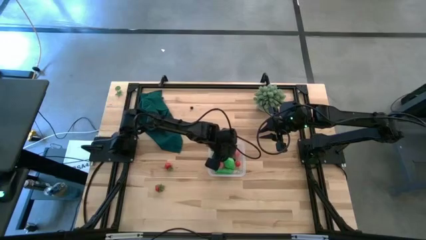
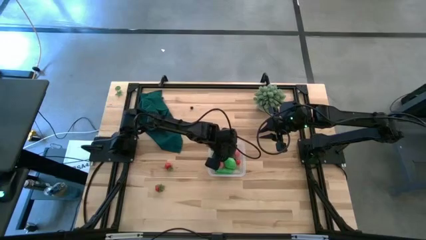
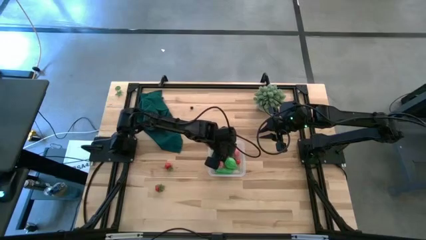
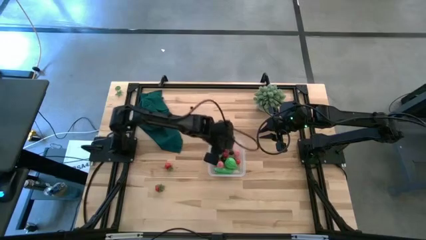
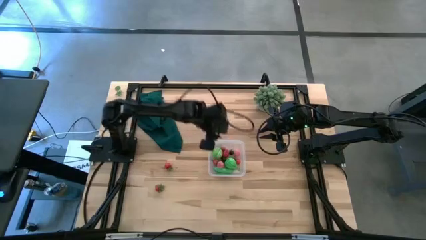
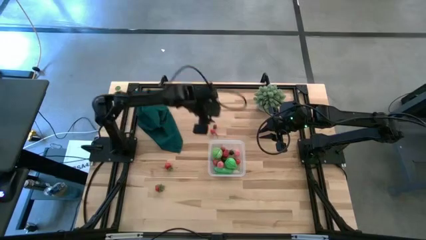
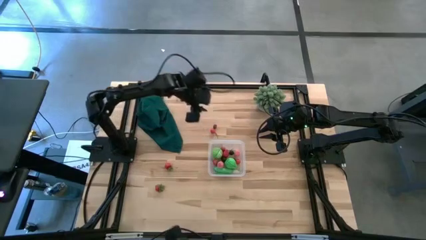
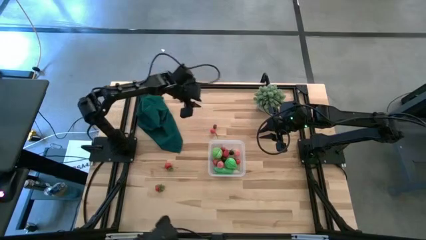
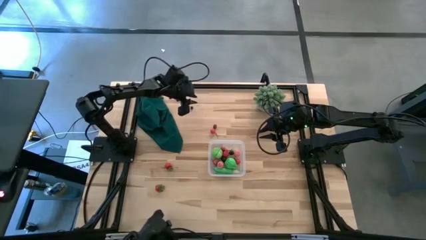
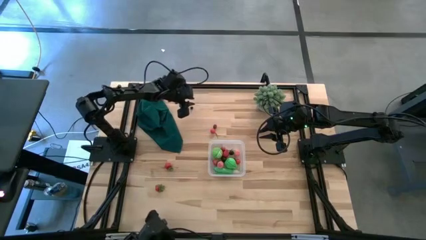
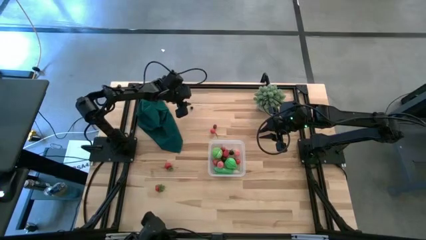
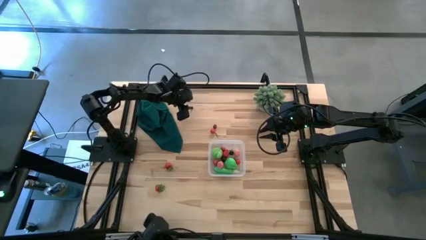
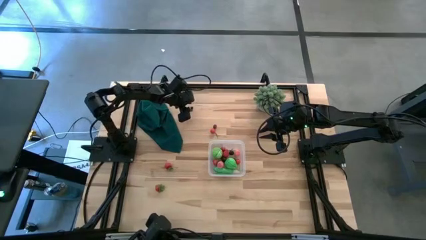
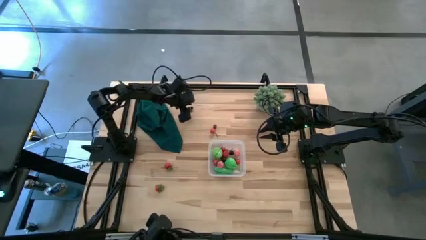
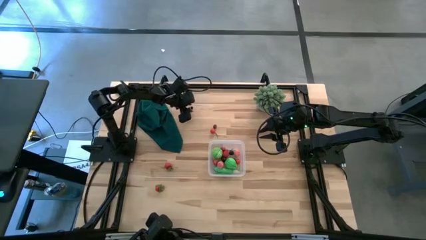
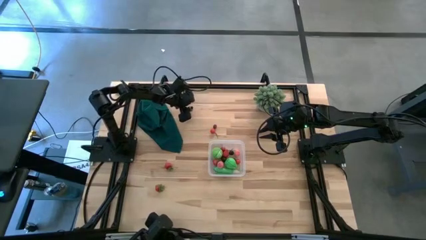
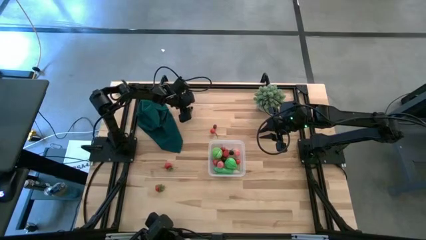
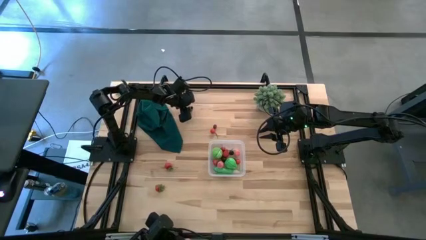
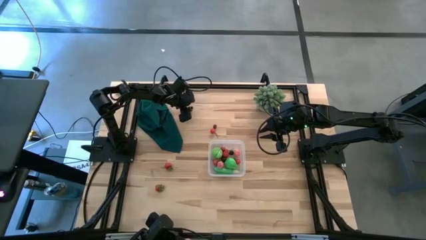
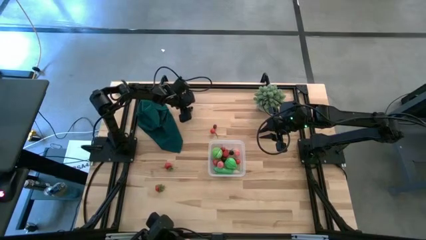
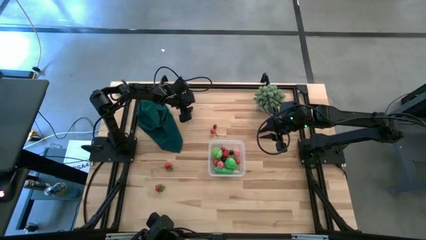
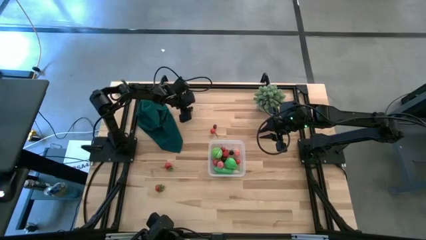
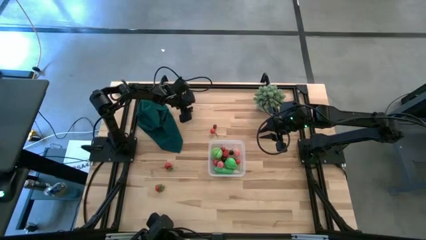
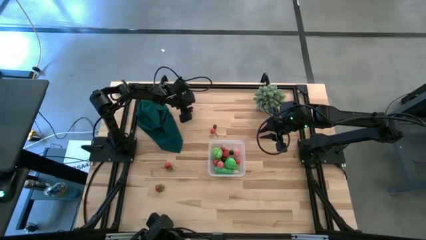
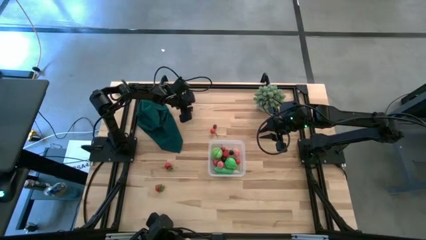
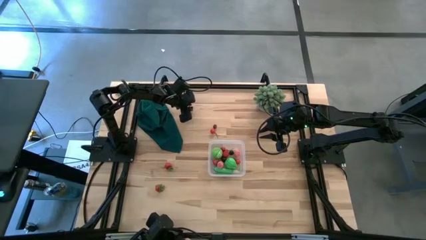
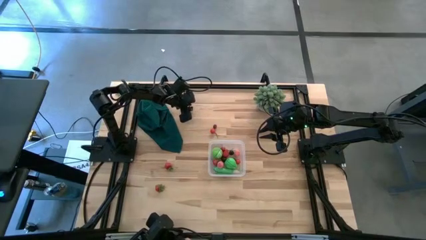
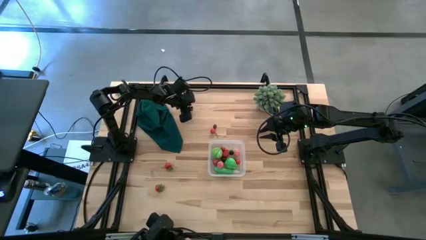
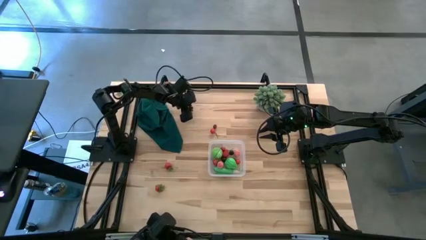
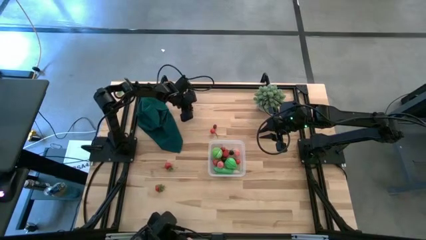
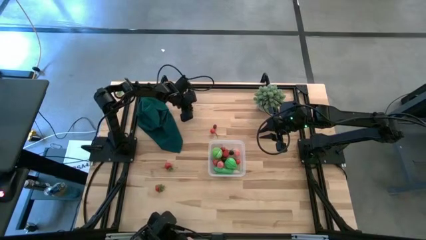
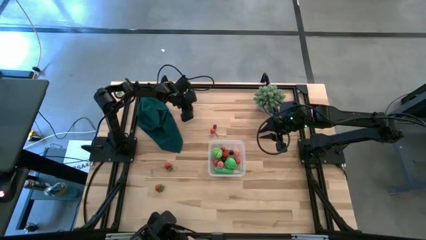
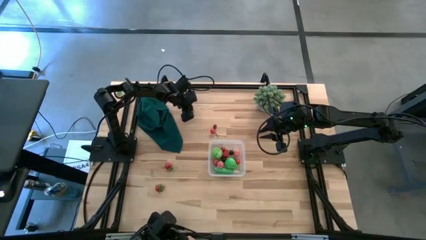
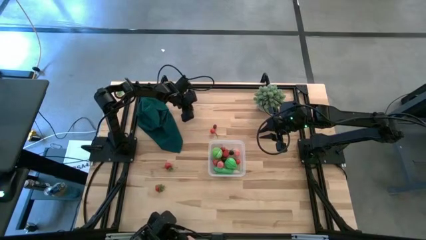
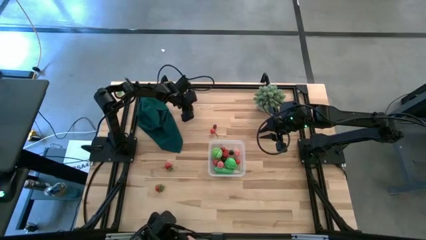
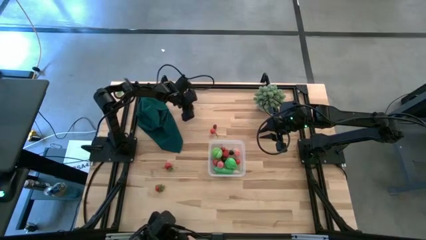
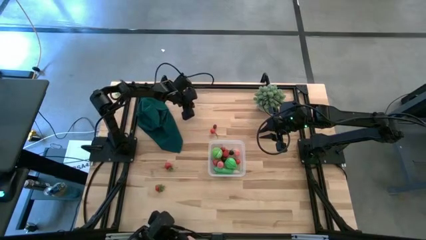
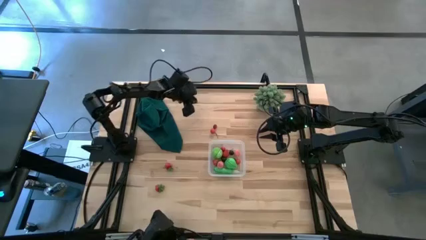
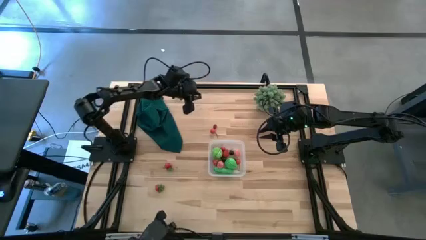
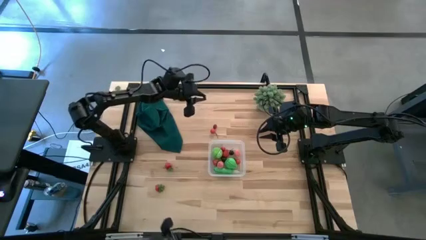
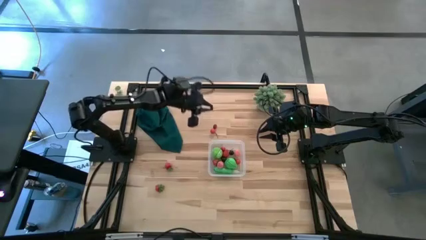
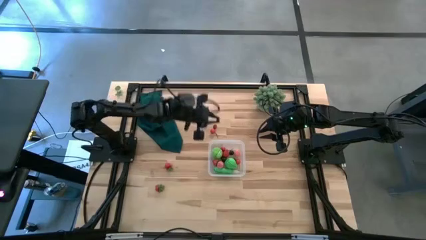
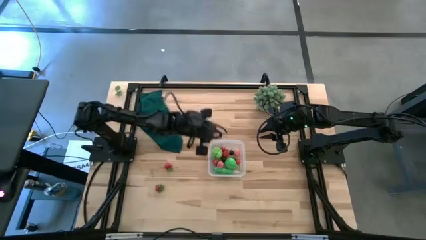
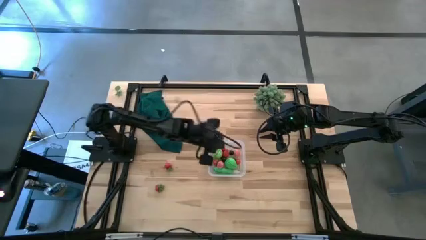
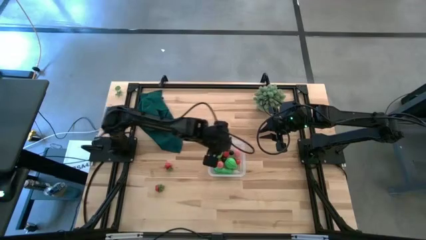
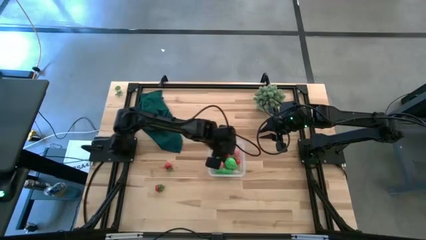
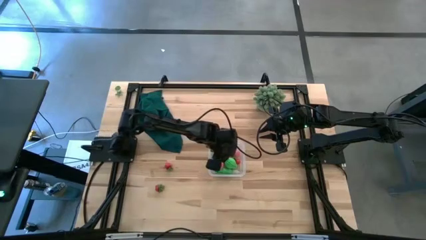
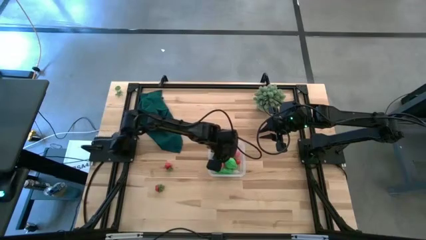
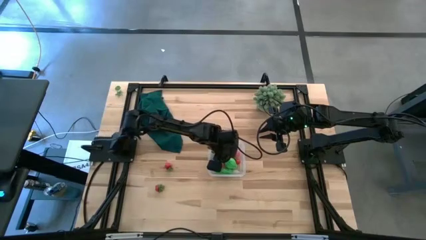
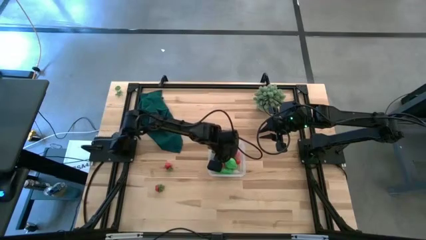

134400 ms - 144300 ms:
Task: Pick and placing Produce into tupperware
Put the blueberry into the container

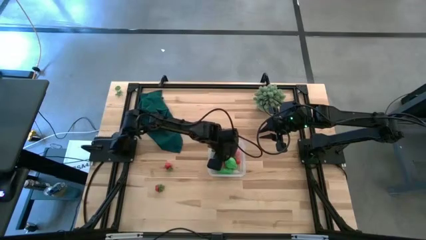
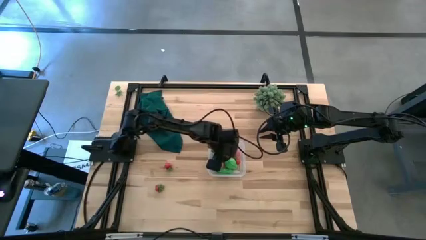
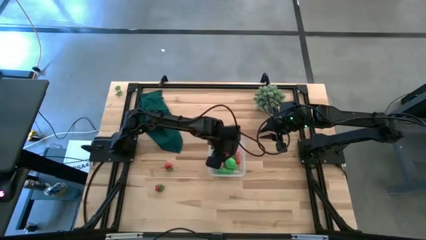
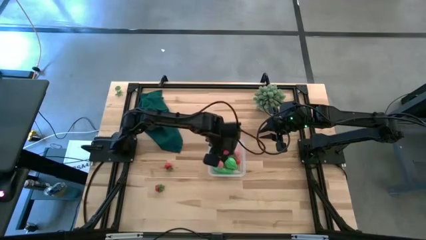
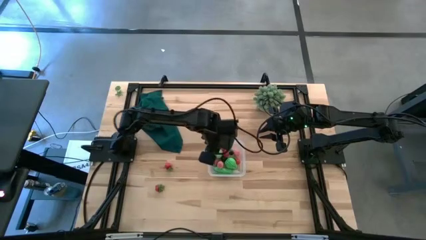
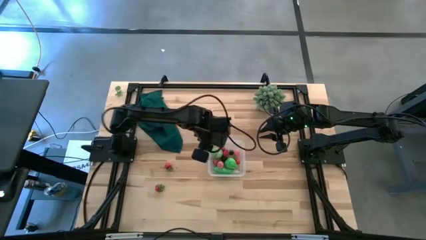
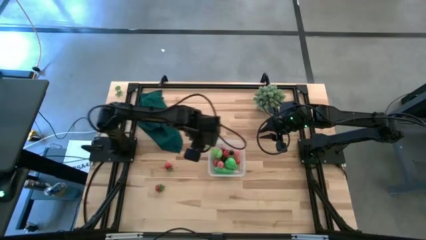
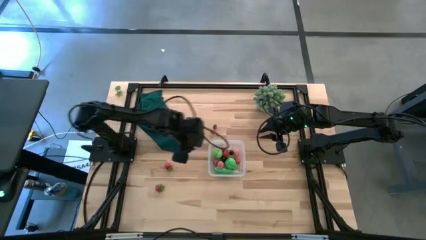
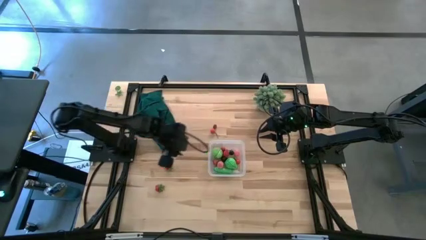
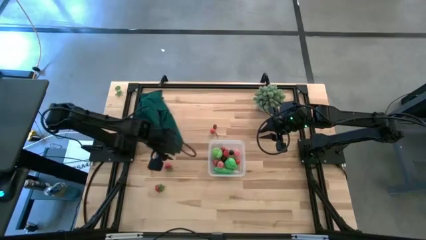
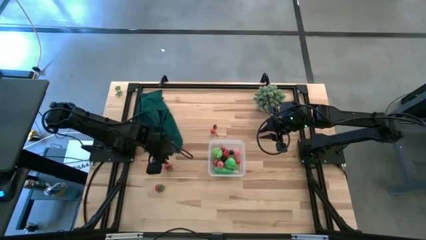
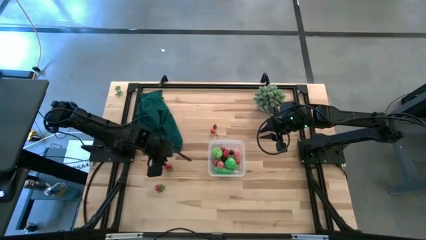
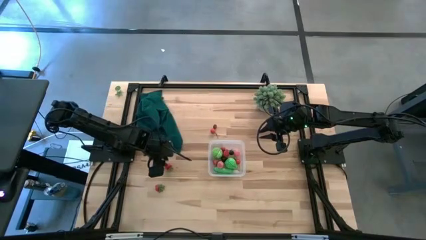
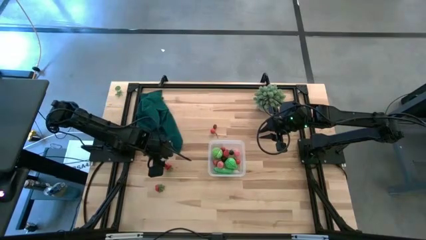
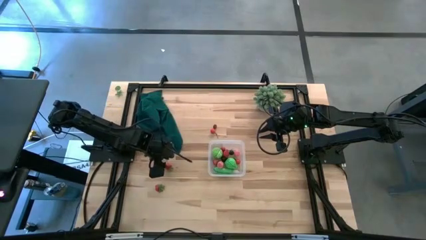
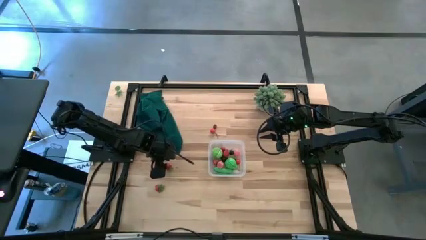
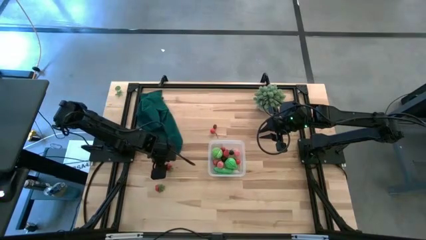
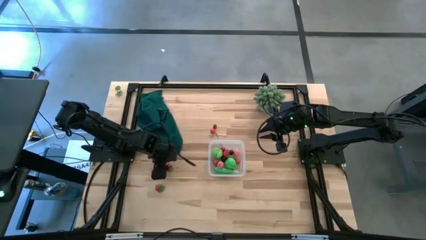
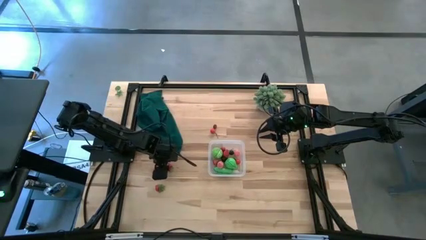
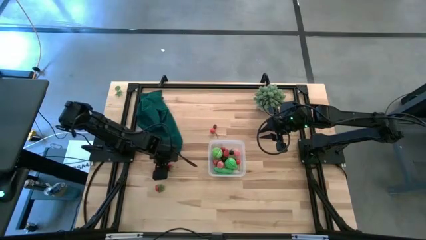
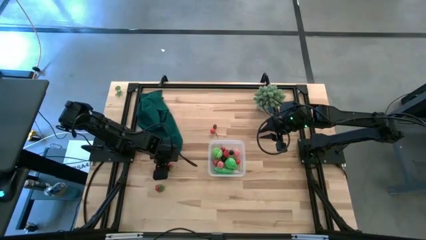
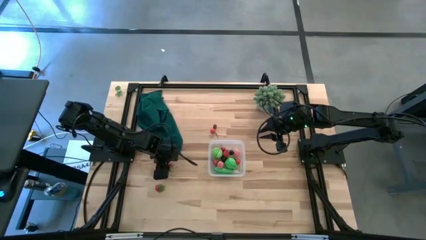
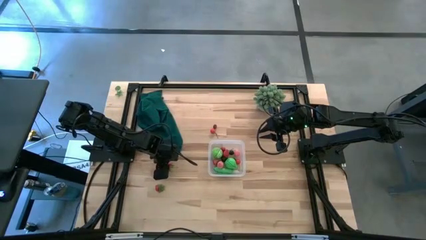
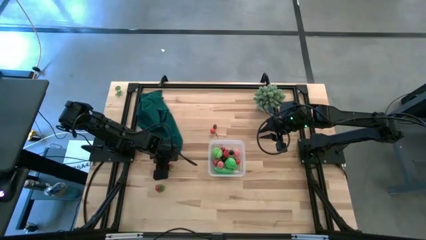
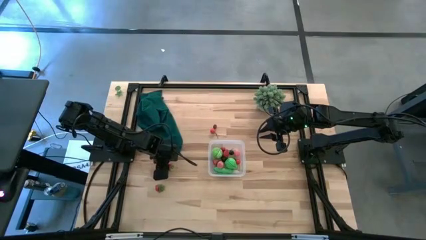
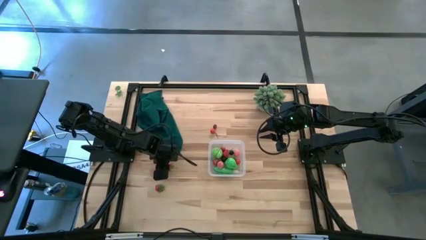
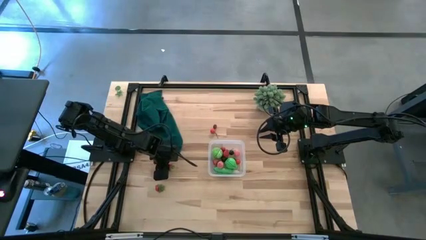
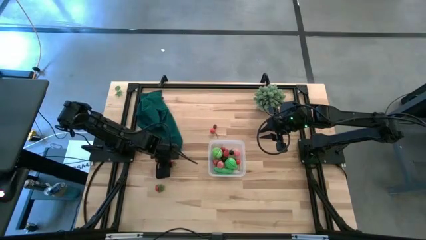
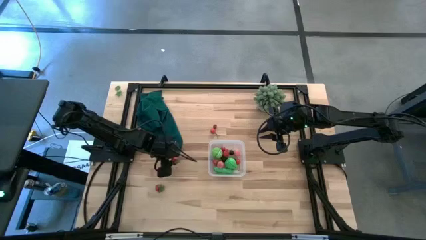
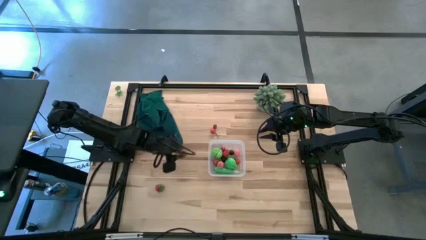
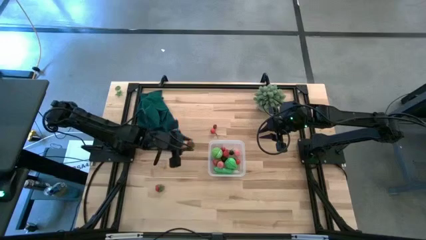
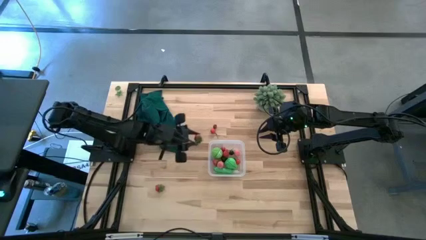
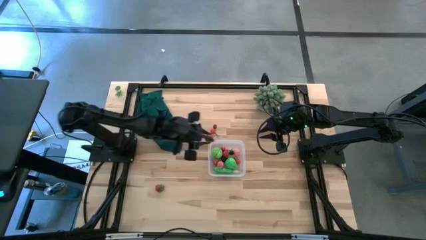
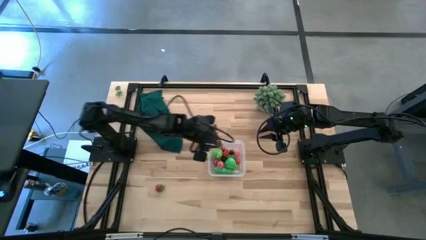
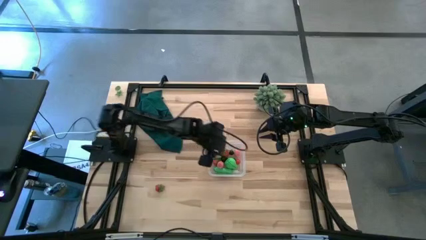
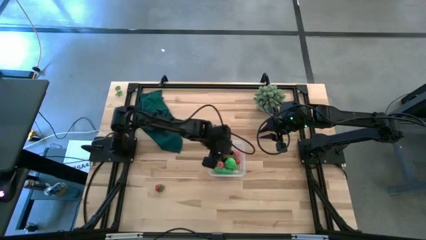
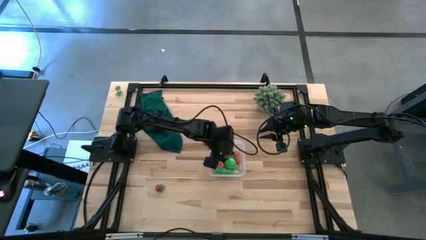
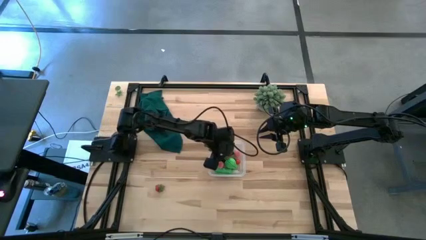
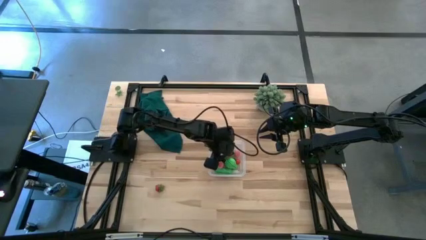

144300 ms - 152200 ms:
Put the top red strawberry into the container
